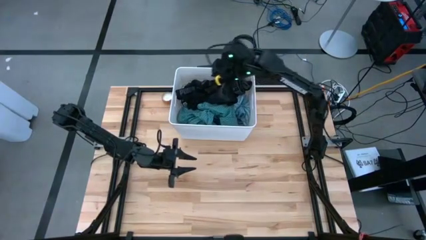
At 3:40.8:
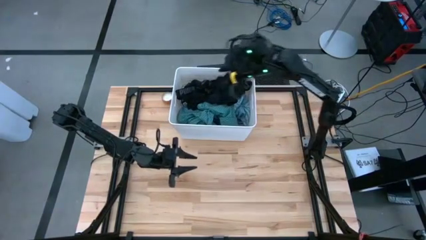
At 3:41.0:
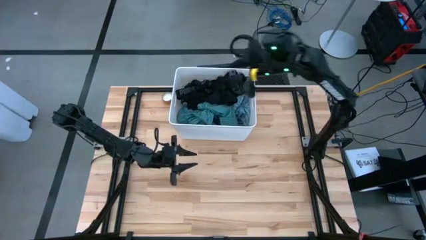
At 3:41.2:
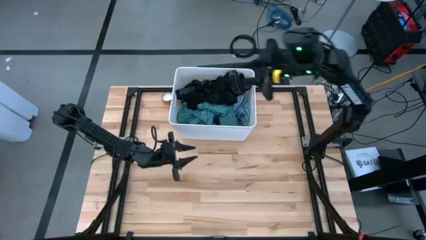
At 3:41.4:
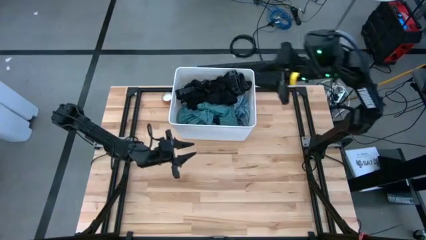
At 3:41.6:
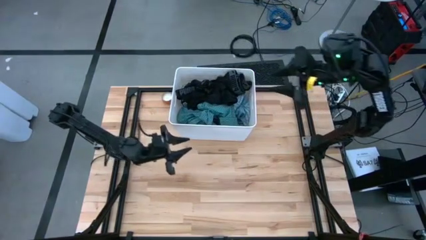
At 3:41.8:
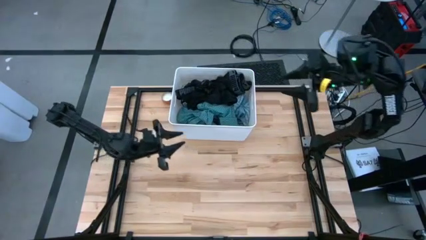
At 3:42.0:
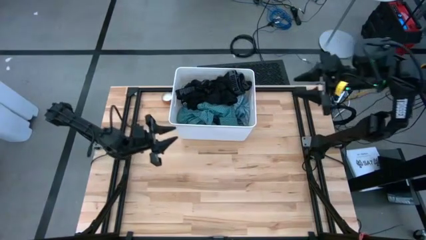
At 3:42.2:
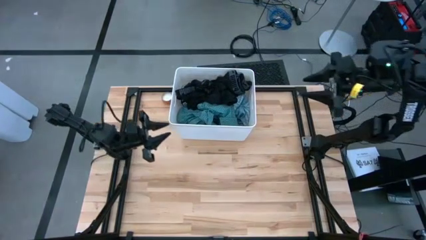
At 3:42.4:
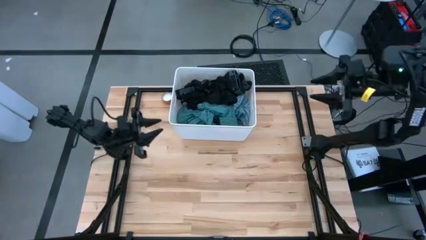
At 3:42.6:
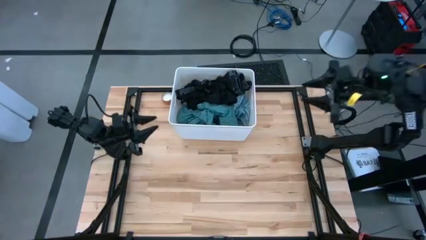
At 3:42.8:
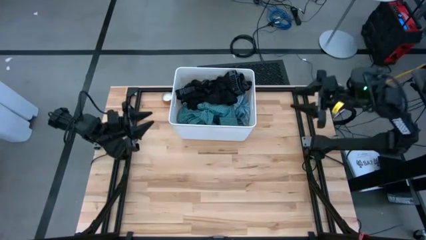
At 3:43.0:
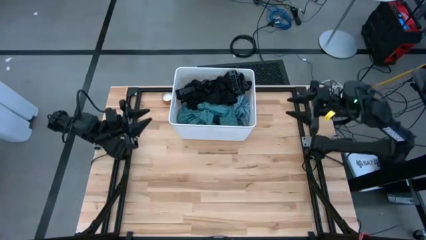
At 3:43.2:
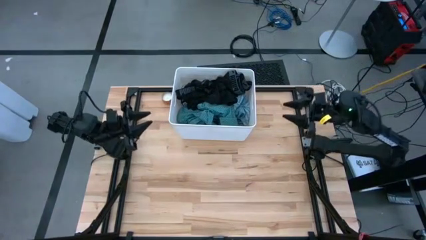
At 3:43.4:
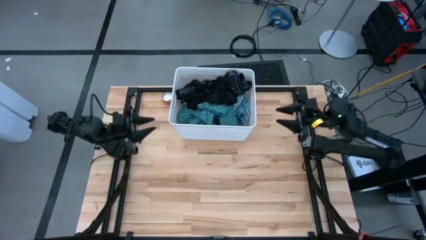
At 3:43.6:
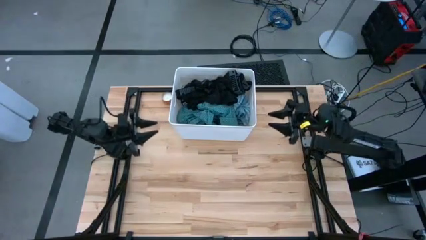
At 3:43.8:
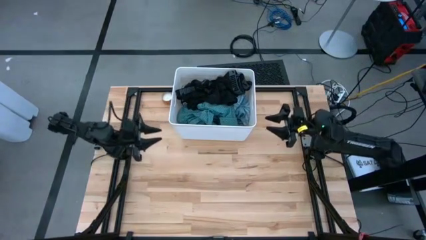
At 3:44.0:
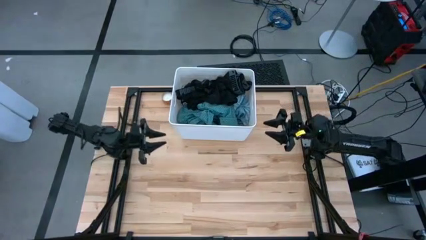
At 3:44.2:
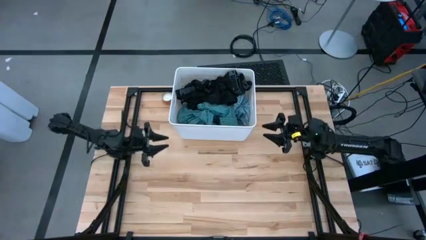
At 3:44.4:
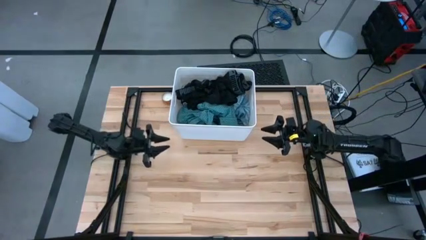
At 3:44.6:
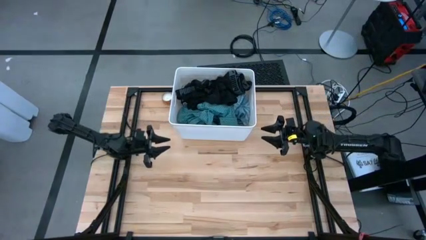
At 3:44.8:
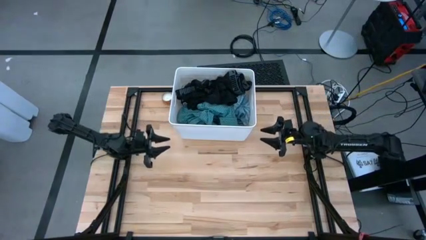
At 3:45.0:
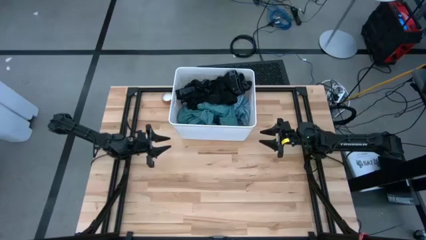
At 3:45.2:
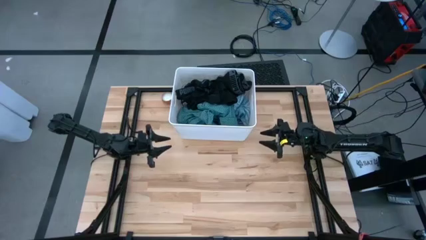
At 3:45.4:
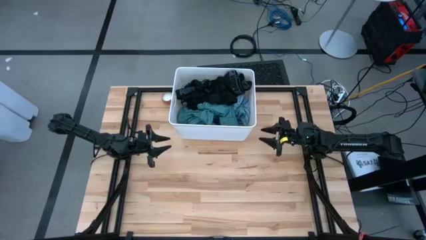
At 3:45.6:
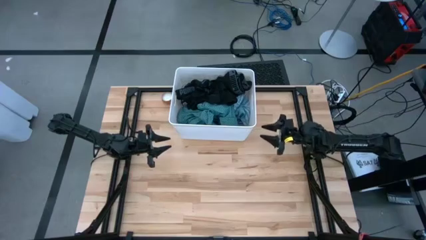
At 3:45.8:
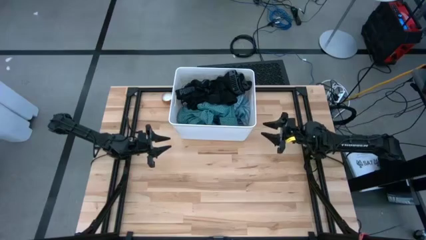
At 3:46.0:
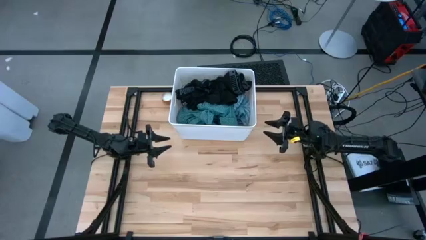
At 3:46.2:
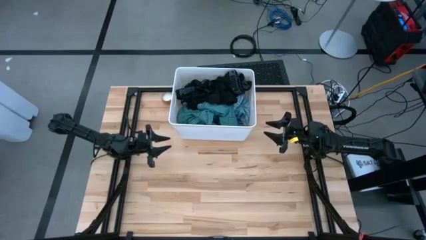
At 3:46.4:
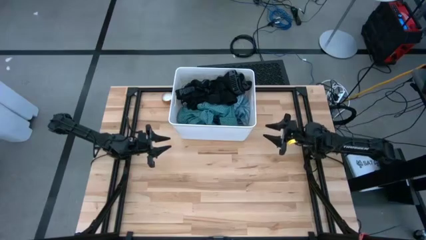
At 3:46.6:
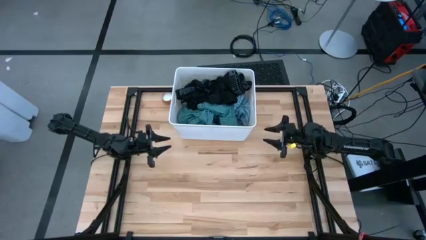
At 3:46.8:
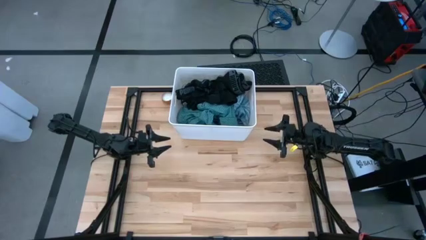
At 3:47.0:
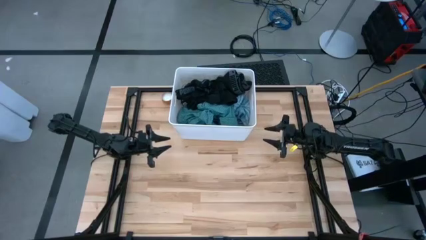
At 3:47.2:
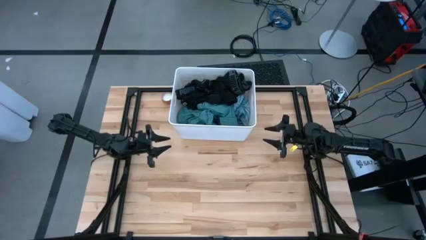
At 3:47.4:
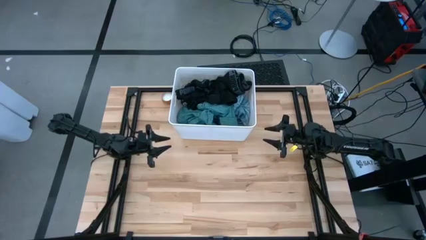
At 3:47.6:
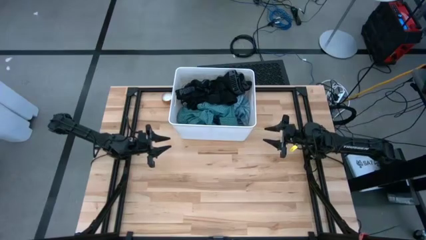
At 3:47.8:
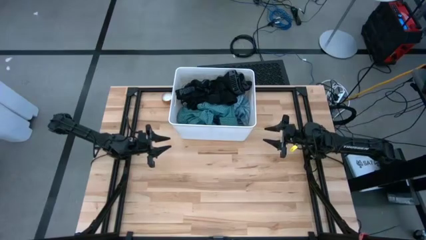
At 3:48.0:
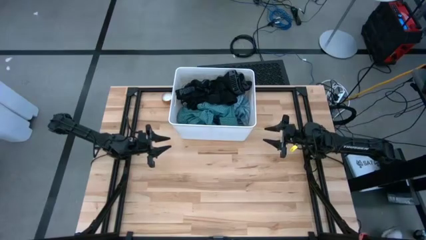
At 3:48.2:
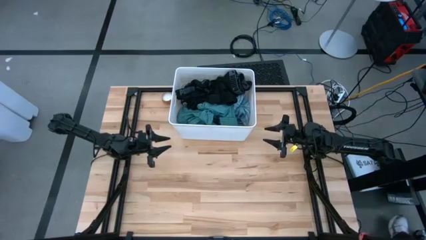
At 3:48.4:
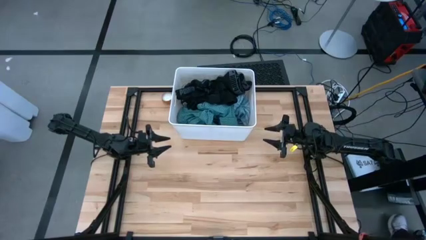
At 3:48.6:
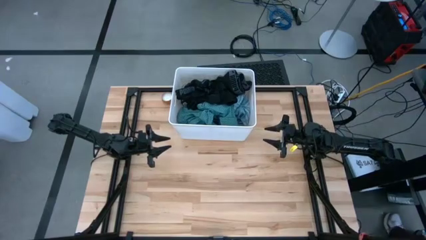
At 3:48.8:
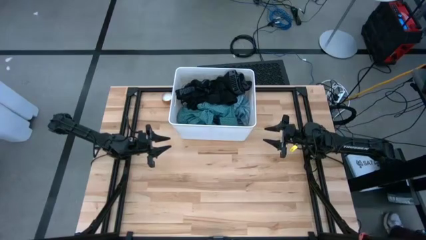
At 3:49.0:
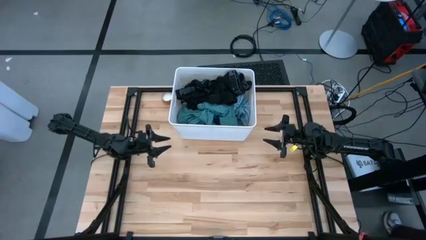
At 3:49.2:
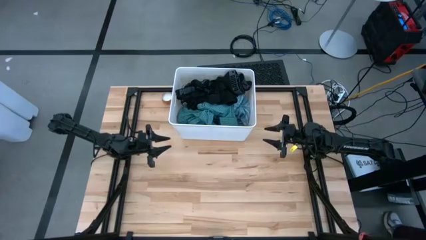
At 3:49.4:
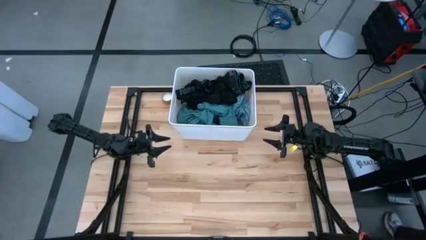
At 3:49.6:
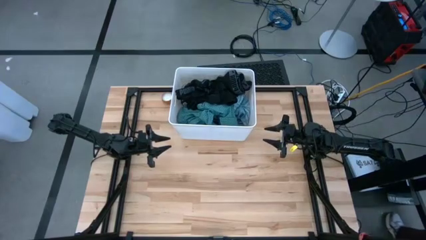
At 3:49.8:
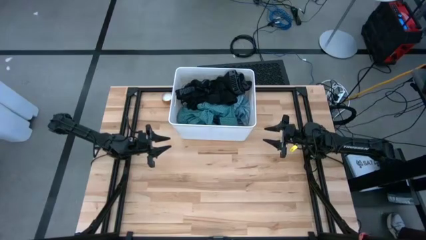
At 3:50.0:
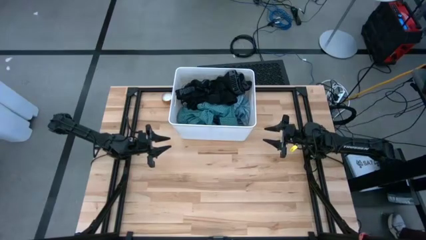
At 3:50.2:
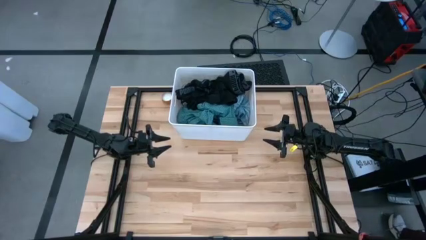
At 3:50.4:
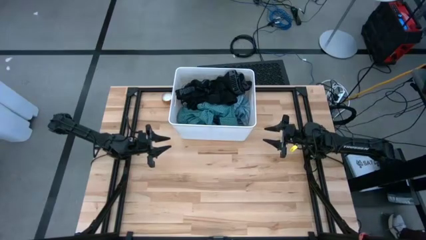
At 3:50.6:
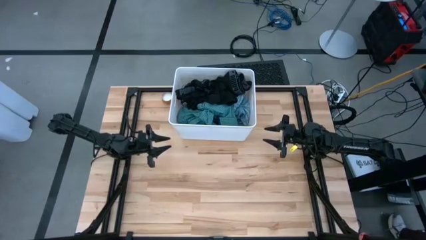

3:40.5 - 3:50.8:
Task: Sort clothes
Return to Home Position

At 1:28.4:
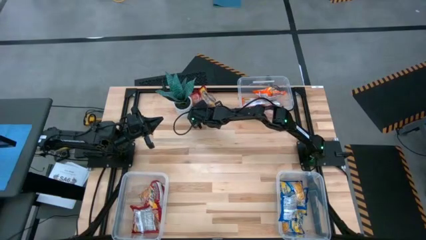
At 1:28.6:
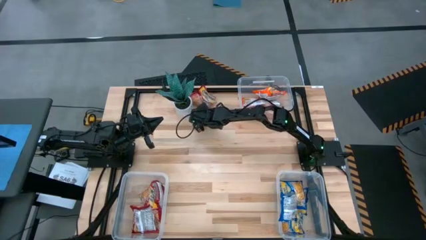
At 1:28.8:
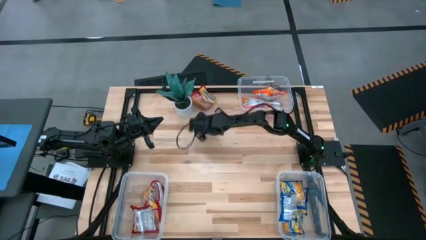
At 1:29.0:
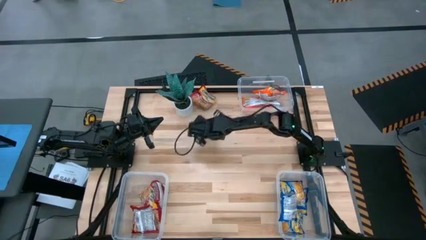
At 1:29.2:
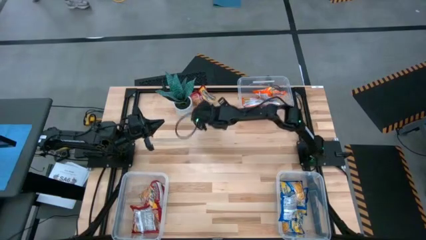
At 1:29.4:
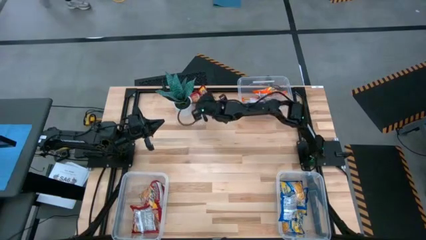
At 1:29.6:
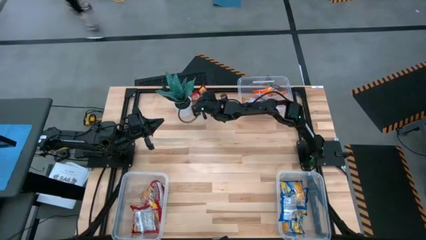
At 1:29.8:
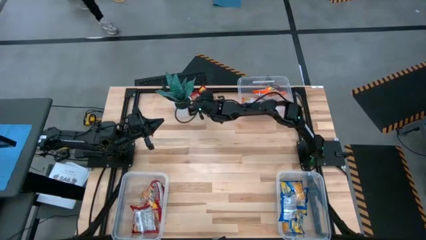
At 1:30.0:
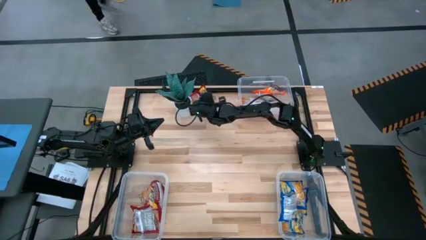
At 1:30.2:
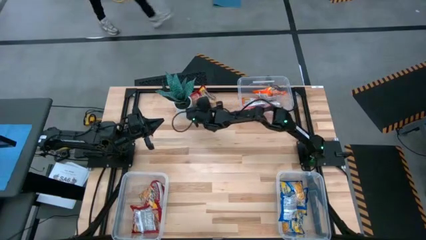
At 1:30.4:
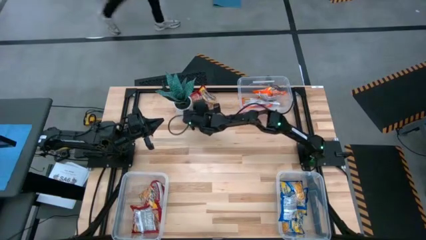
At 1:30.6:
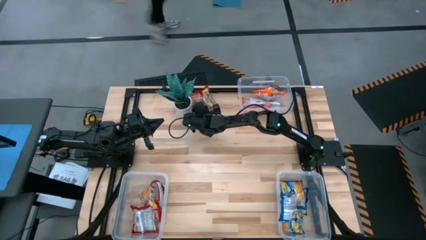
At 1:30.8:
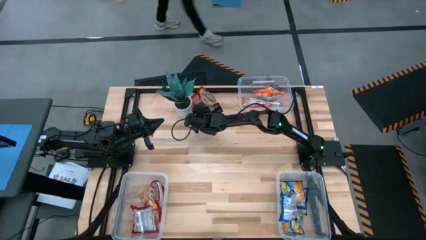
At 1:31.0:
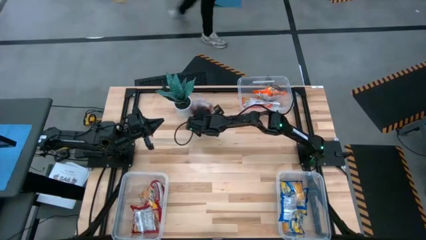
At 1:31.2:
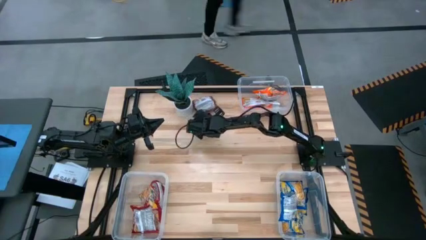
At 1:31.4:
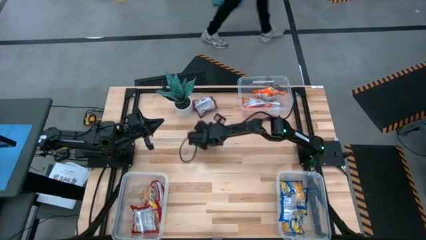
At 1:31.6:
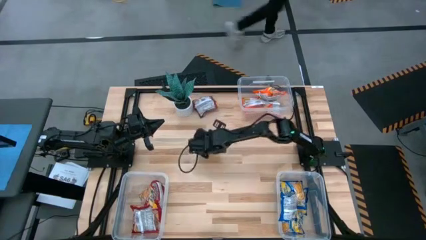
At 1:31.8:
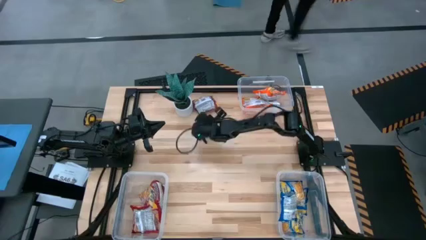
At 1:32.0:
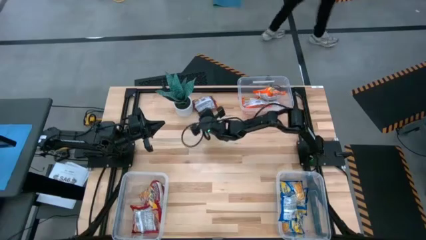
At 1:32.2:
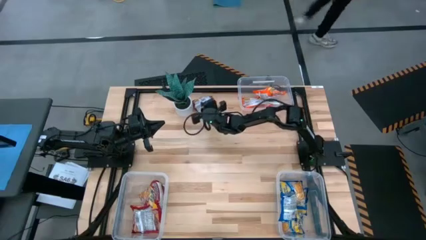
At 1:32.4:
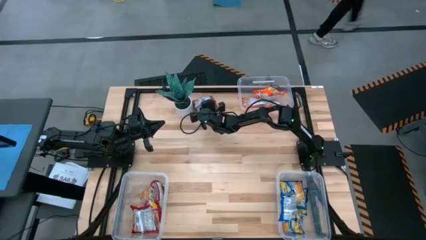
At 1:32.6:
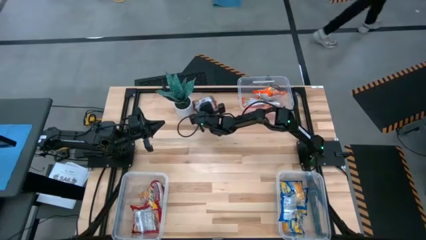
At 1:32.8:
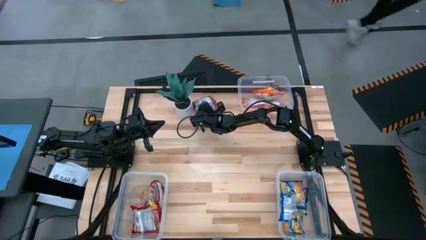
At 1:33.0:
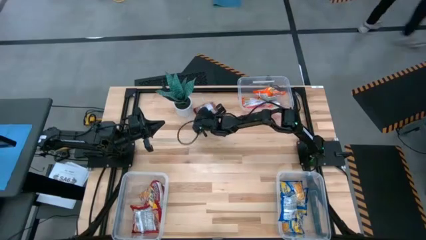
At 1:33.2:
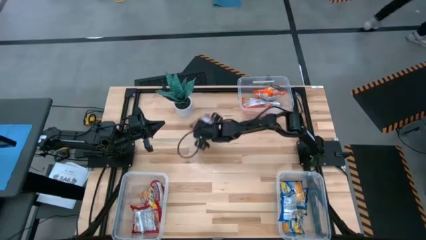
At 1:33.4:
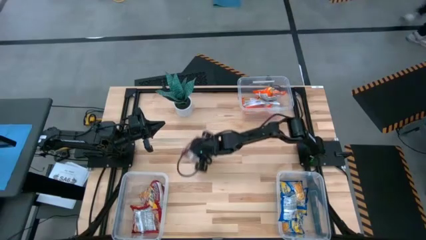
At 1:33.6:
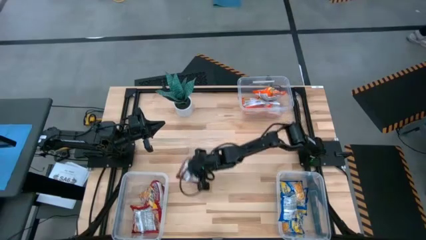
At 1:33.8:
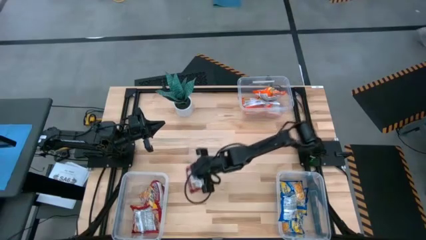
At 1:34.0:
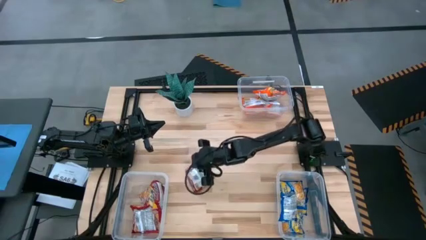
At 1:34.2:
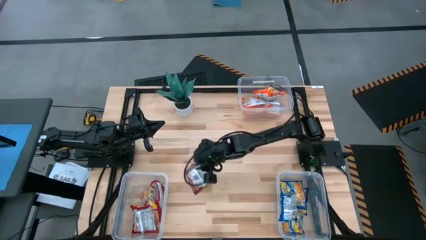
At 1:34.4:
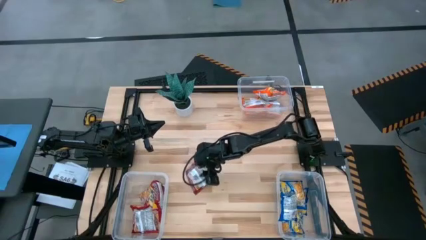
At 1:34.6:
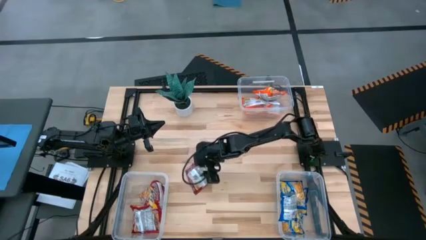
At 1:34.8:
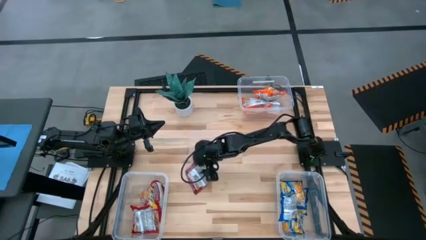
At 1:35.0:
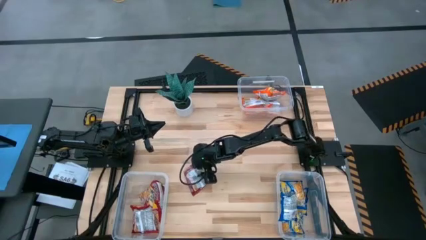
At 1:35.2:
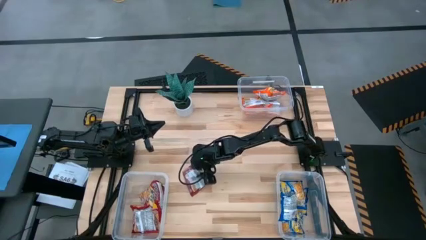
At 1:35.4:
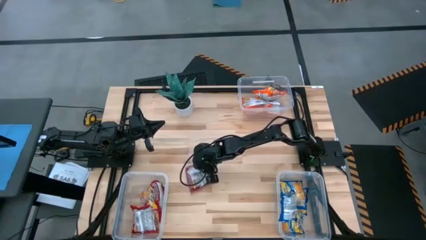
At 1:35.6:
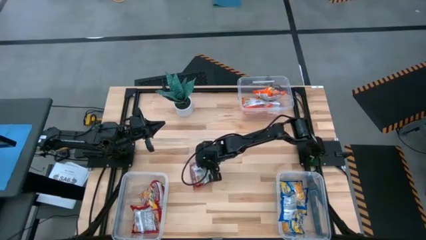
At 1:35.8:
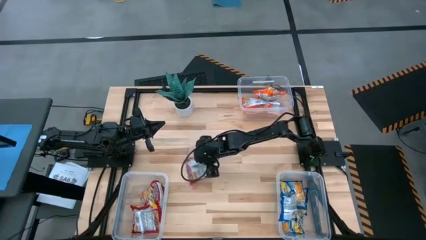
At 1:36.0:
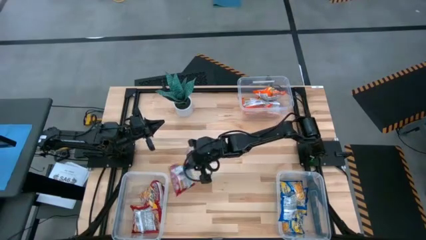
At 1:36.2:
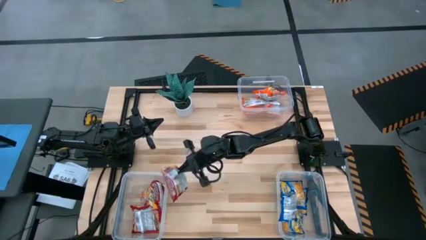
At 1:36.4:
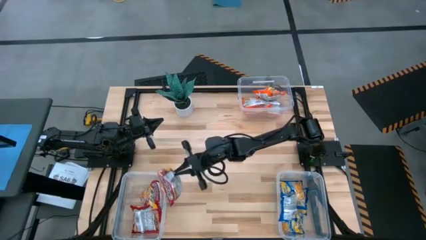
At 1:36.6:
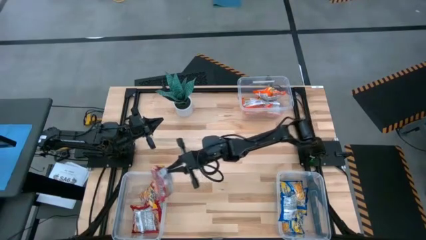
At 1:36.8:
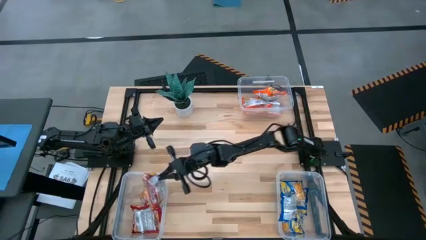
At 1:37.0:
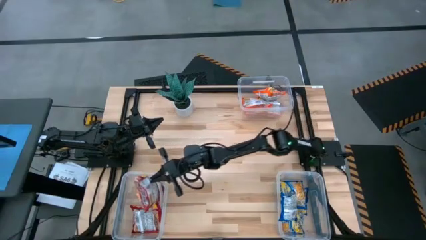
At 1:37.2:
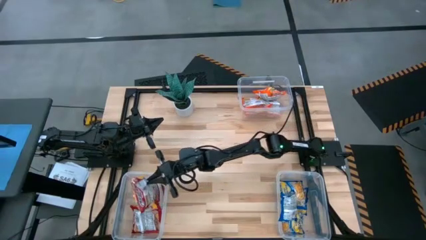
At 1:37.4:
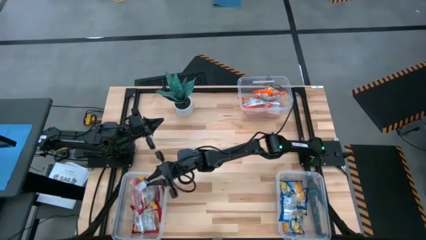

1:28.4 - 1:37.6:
Task: Sort Maruchan noodles
Put the red noodle pack into the bottom left transparent bin
